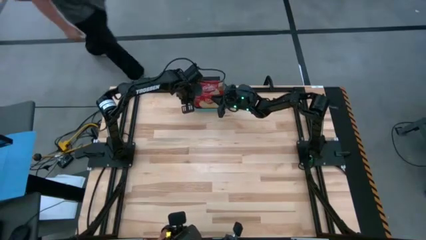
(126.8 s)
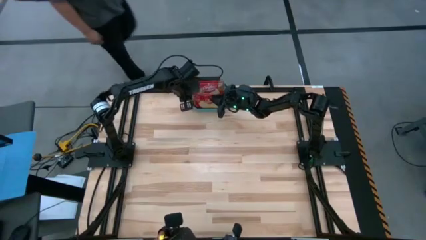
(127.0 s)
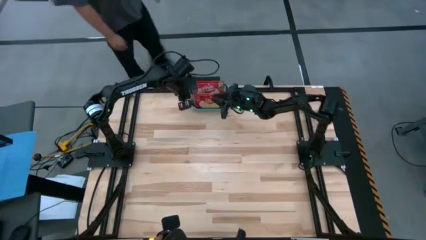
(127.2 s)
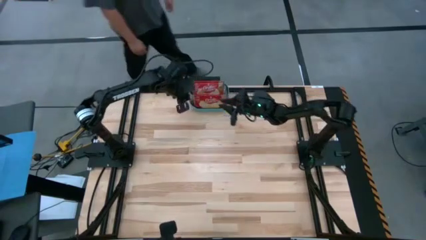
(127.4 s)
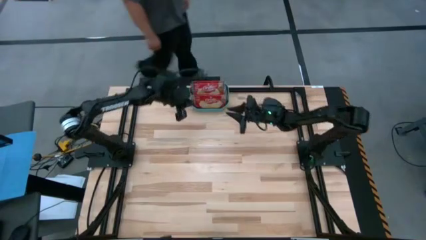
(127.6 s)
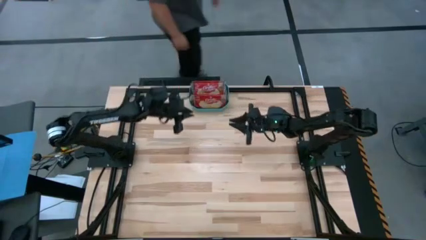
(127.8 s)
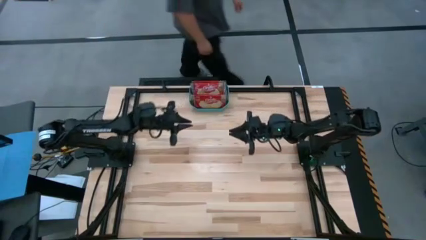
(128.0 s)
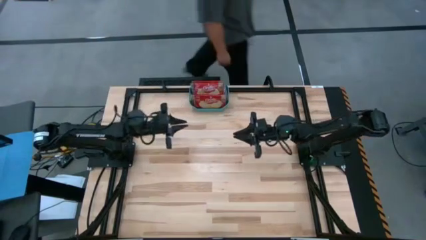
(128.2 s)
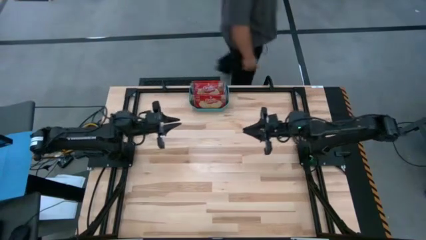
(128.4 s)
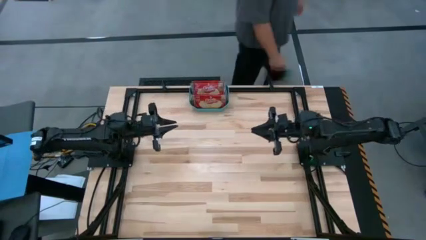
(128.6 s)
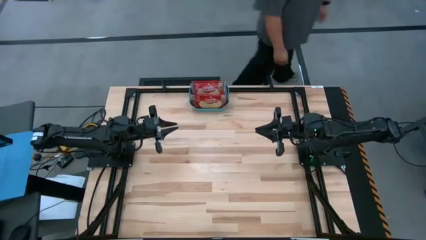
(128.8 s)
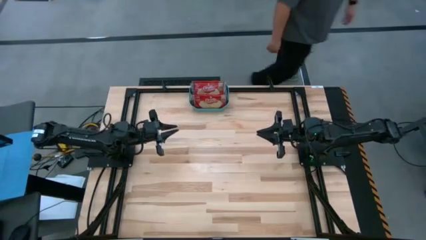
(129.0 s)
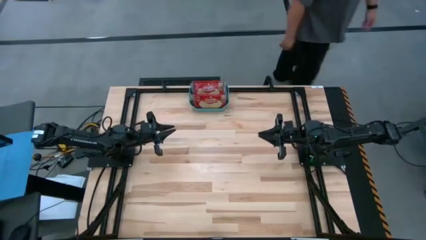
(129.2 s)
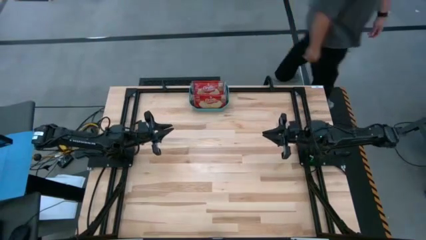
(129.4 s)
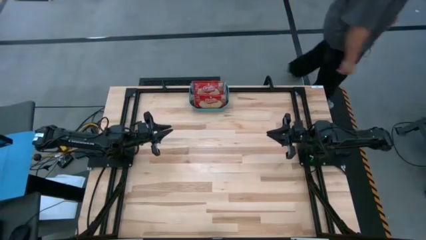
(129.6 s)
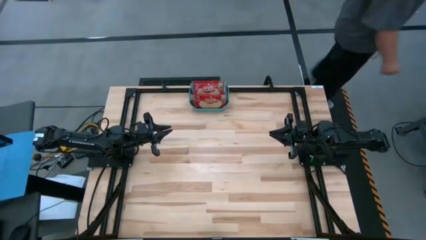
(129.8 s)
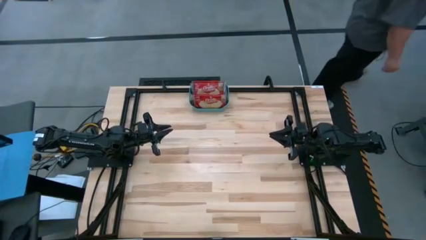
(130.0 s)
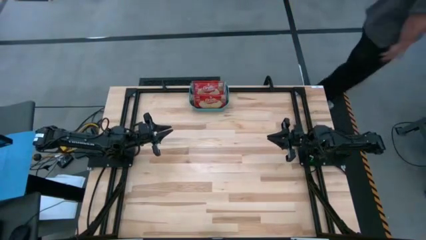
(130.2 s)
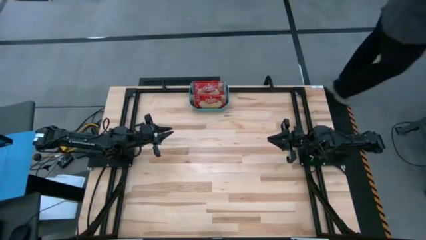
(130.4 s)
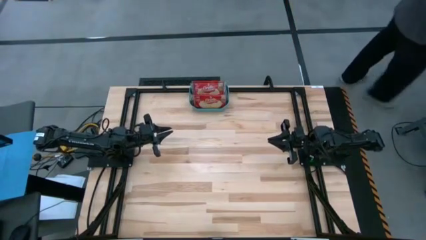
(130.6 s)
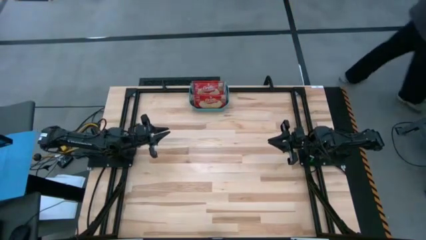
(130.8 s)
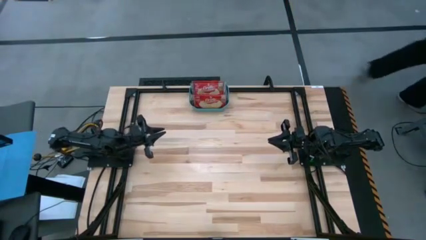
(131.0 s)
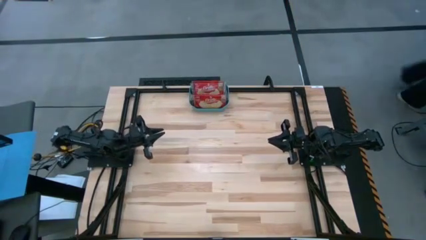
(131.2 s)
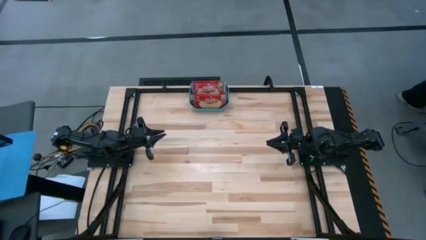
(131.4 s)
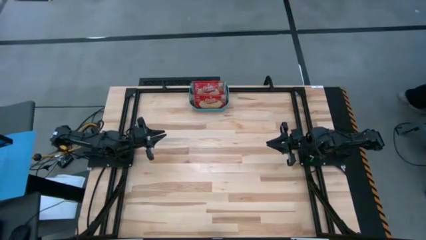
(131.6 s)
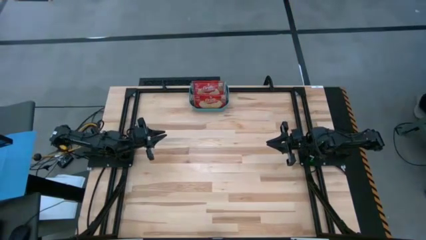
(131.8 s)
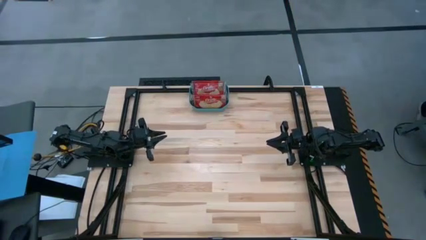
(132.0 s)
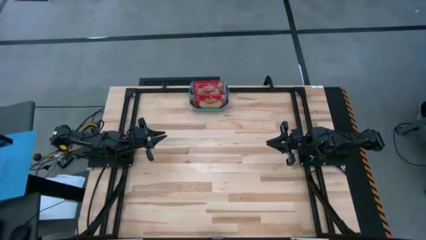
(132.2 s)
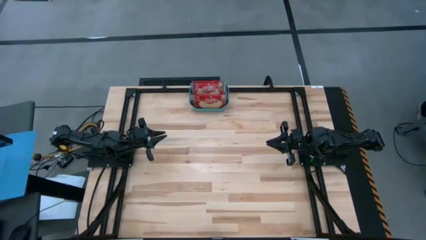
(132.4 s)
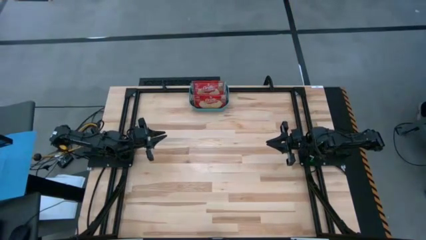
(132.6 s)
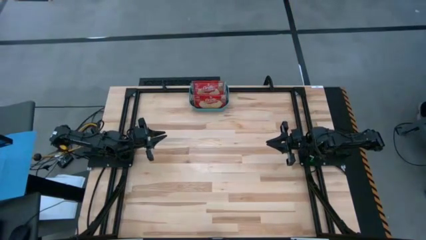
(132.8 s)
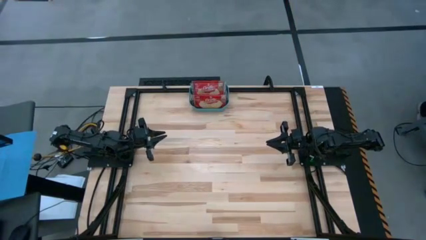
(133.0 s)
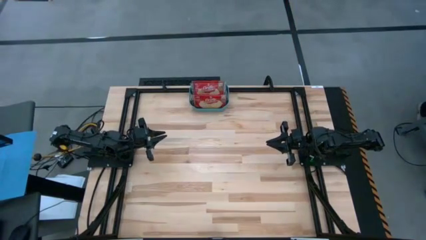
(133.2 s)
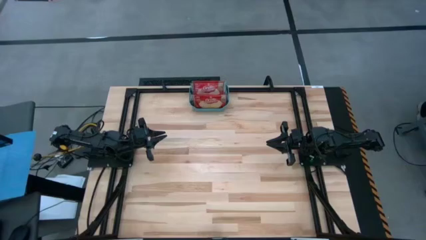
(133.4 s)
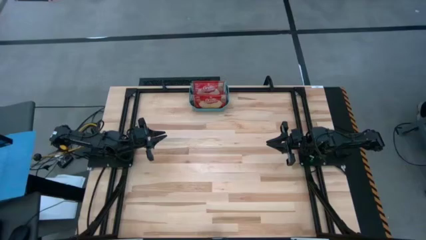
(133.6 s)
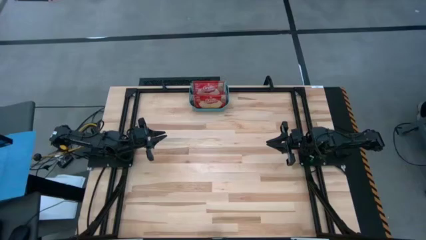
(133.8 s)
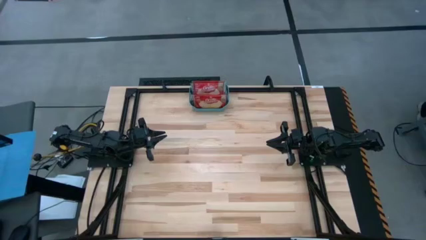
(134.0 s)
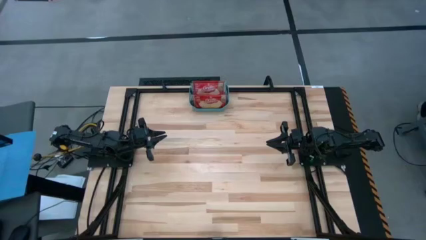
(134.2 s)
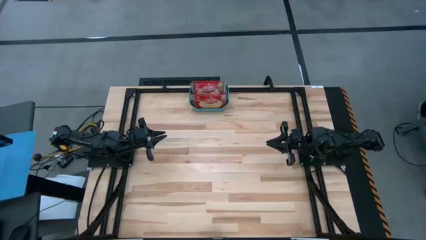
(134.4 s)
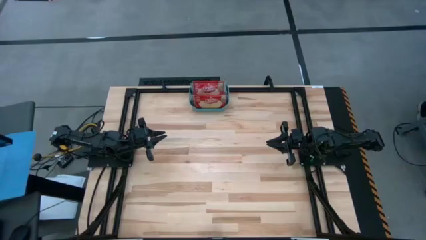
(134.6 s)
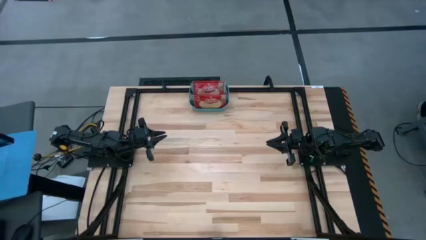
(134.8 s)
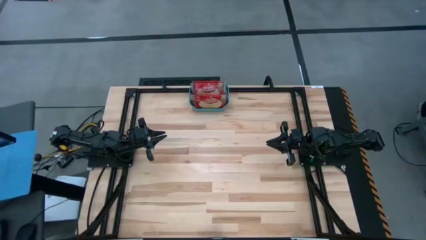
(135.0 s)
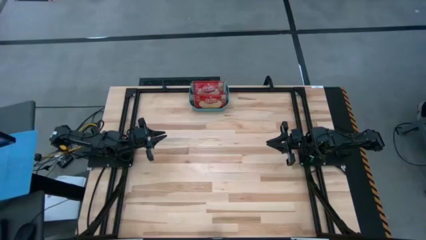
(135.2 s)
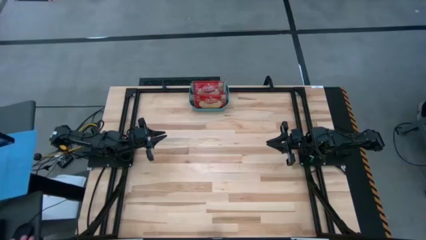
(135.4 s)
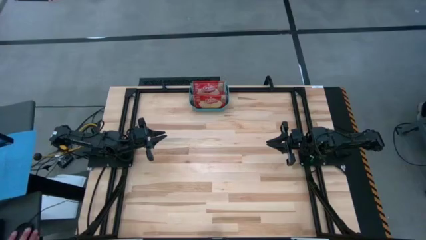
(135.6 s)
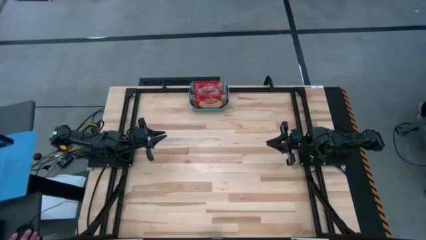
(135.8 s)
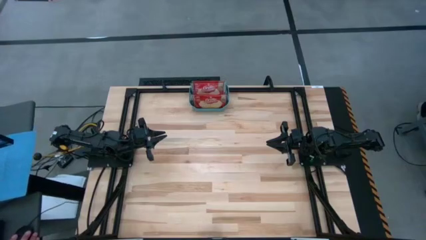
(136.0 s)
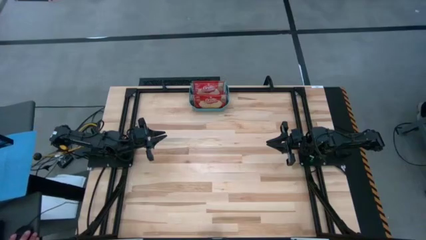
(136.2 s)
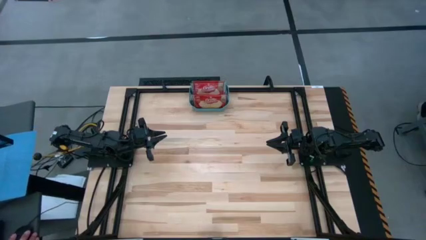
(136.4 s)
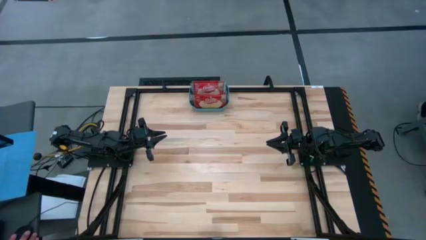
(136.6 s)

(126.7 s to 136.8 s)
Task: Sort popcorn bags into baskets
Return to Home Position
